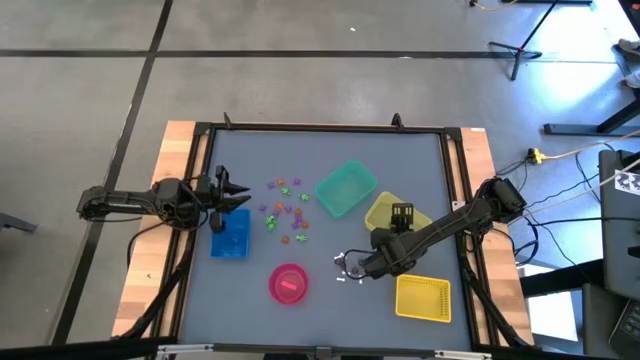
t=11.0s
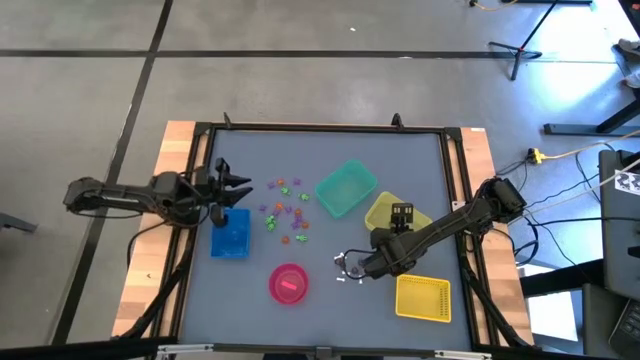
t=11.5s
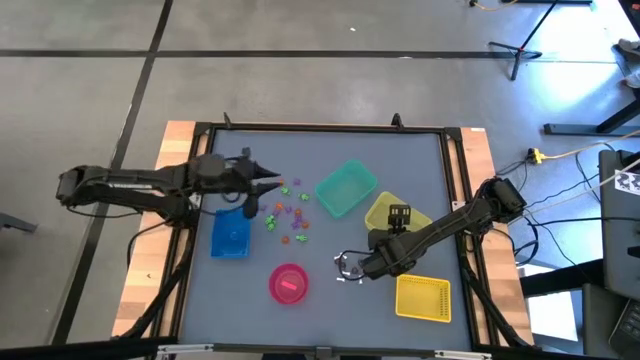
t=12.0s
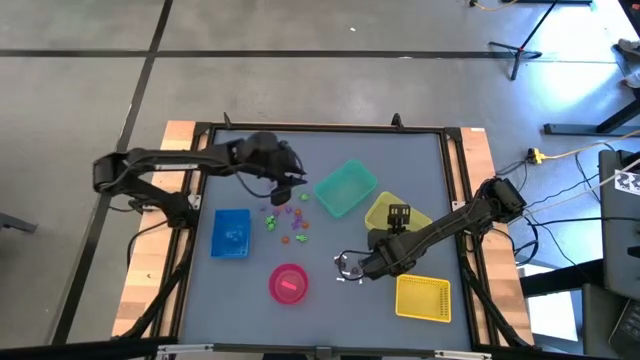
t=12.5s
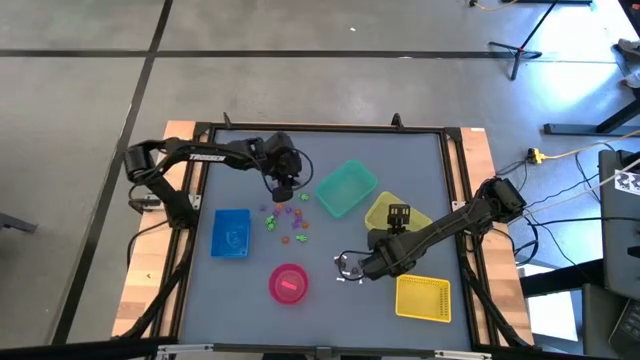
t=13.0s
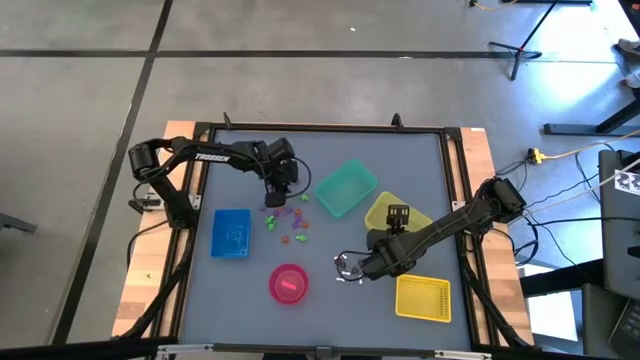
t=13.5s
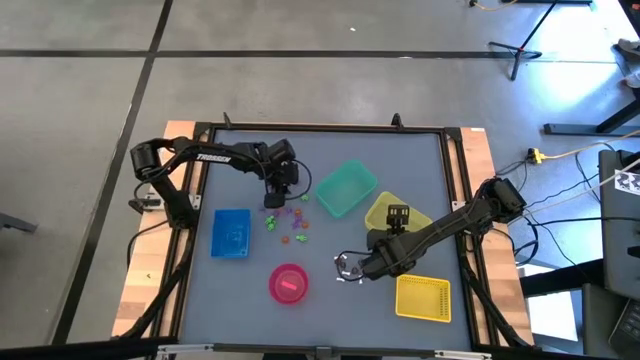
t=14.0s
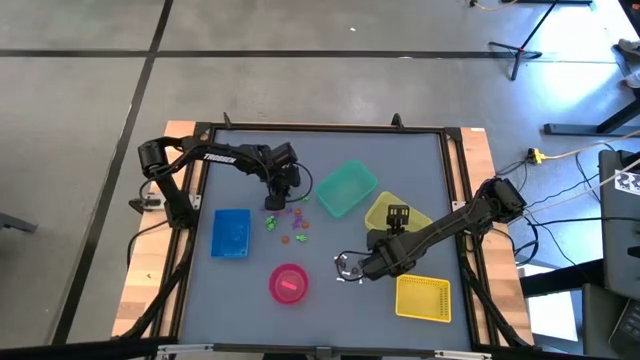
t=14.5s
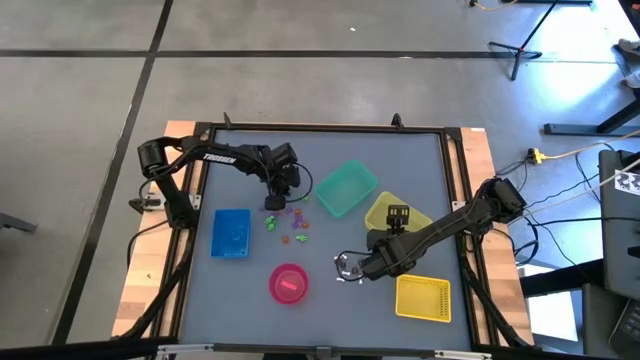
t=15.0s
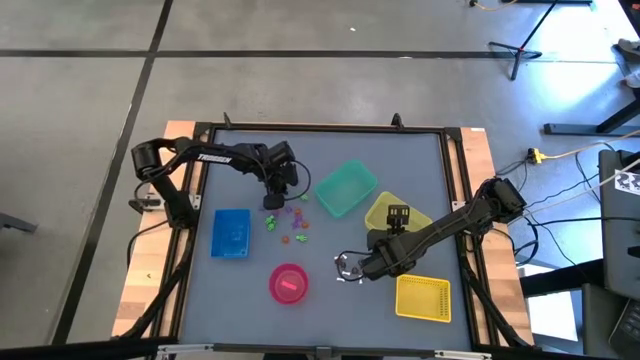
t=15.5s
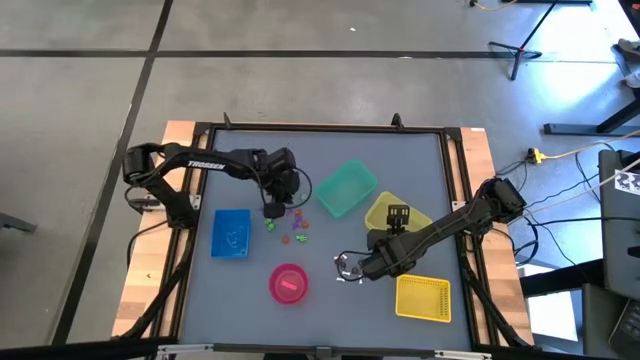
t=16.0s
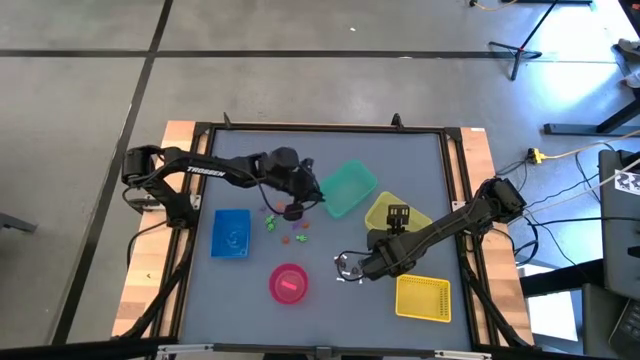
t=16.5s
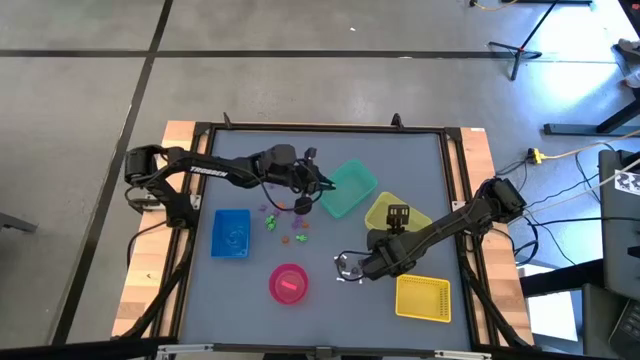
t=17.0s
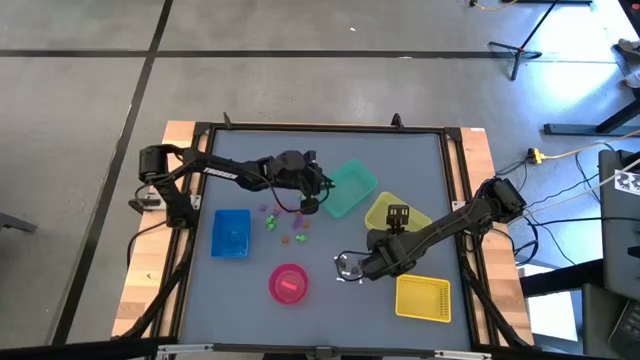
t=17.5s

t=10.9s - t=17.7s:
Task: Sort Halloween decoration
Put the green skeleton toy into the green bin

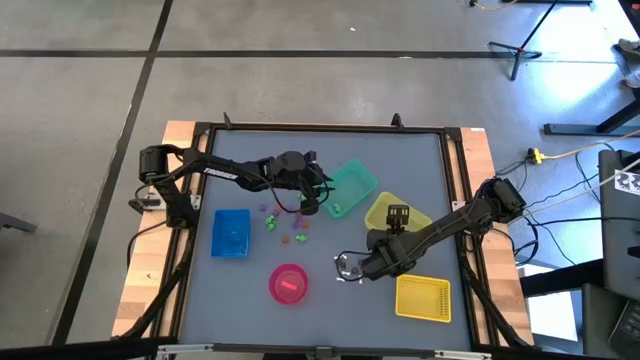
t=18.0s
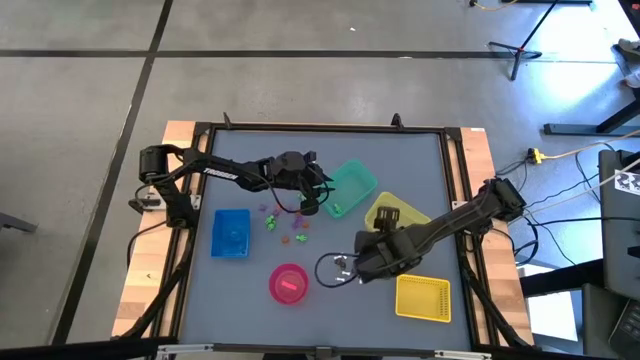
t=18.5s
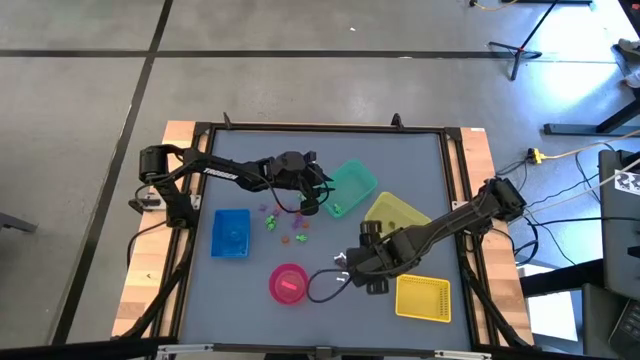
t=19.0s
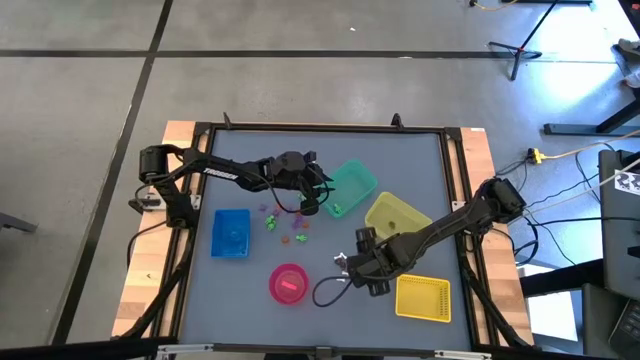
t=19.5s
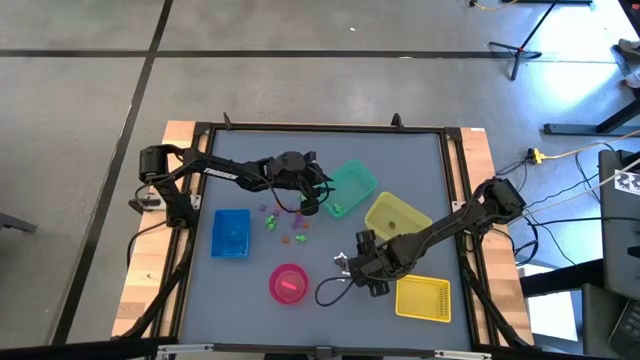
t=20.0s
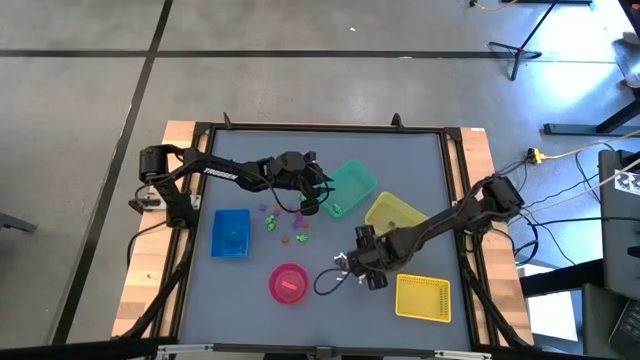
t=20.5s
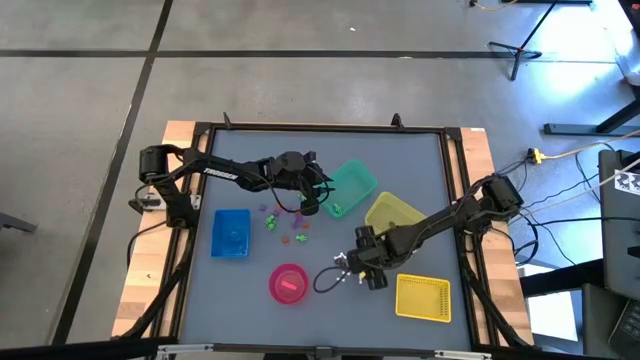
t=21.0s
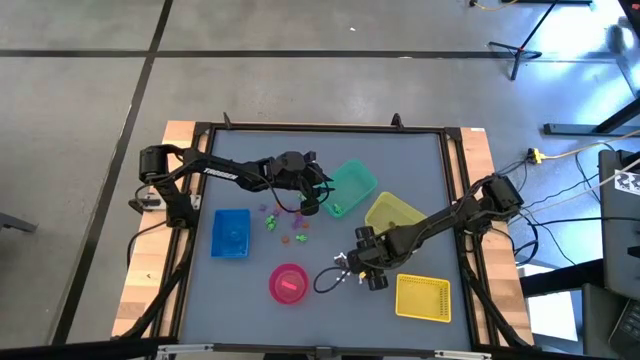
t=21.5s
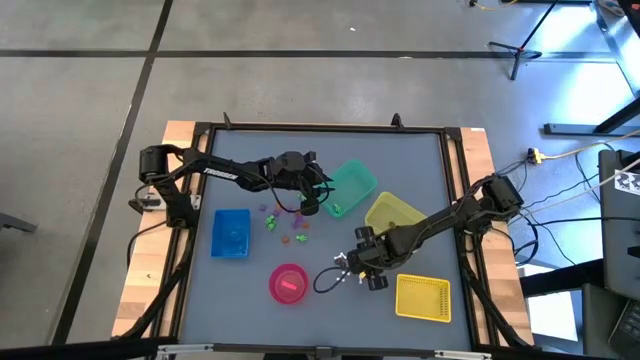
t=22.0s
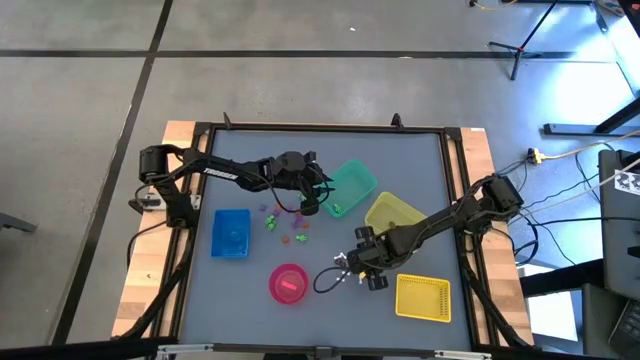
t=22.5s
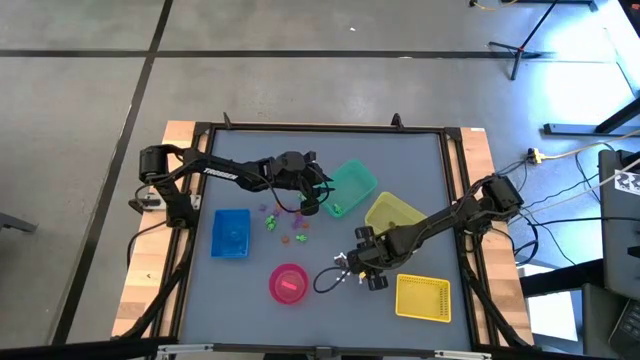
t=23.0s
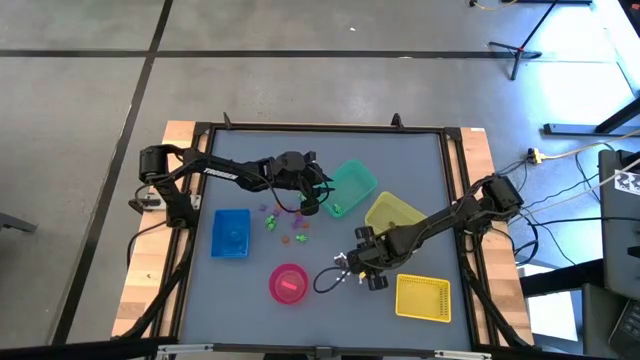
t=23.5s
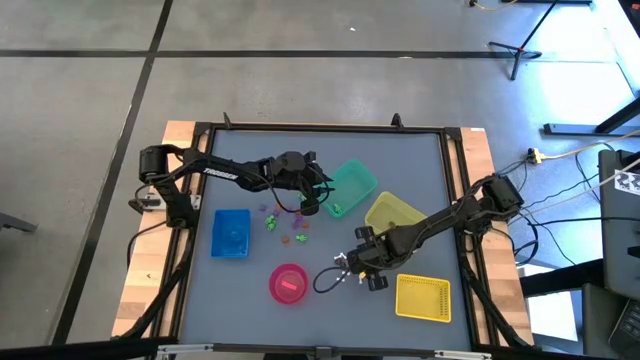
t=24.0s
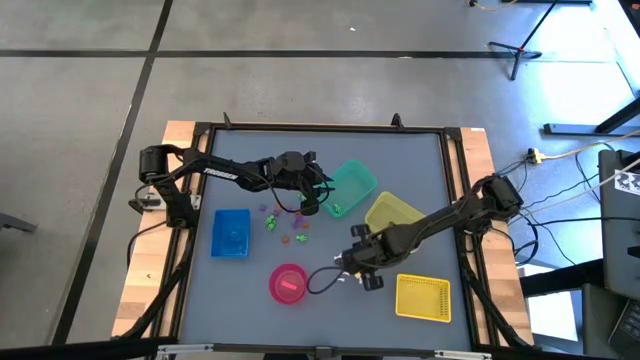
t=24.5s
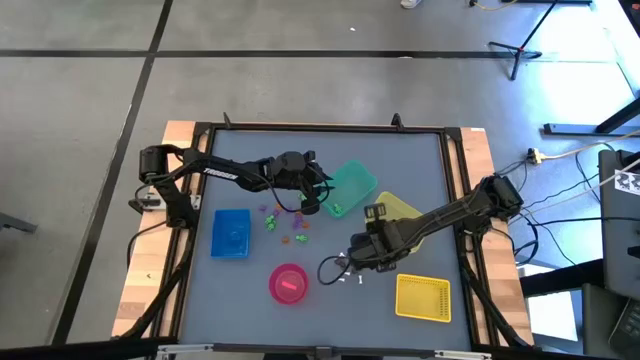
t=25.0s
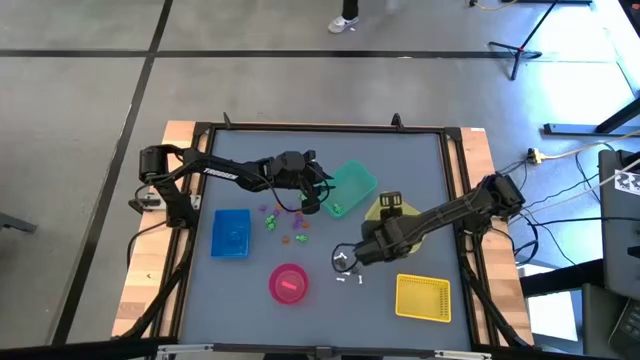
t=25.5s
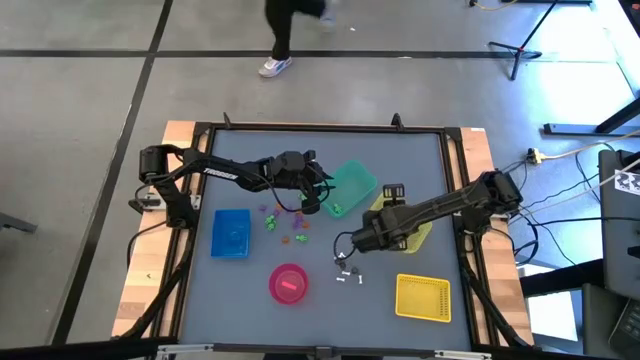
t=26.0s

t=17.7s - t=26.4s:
Put the black skull toy into the light yellow bin

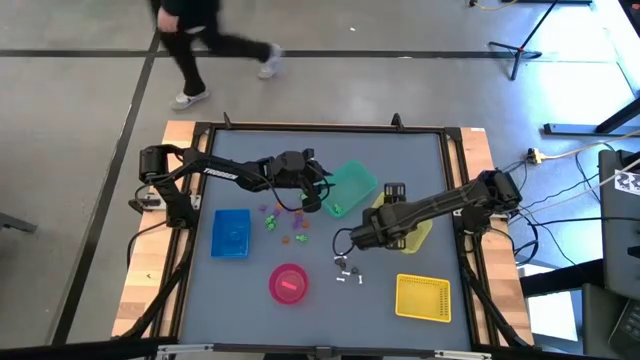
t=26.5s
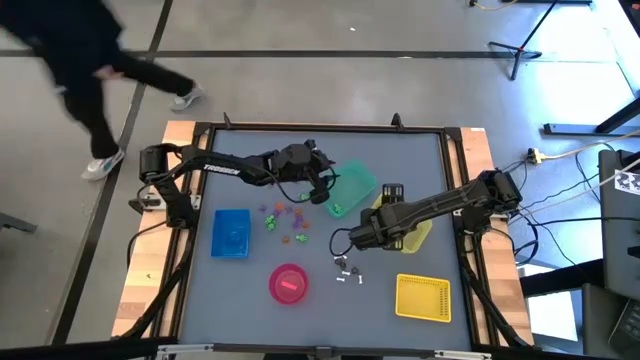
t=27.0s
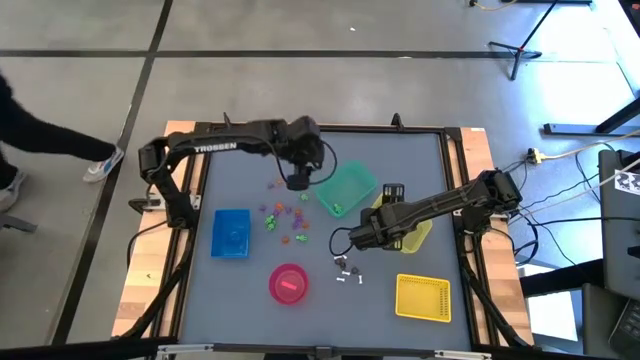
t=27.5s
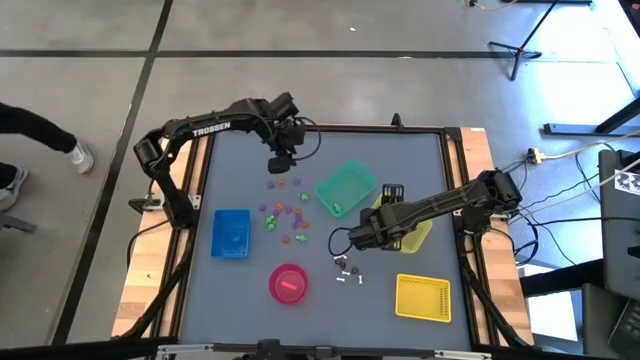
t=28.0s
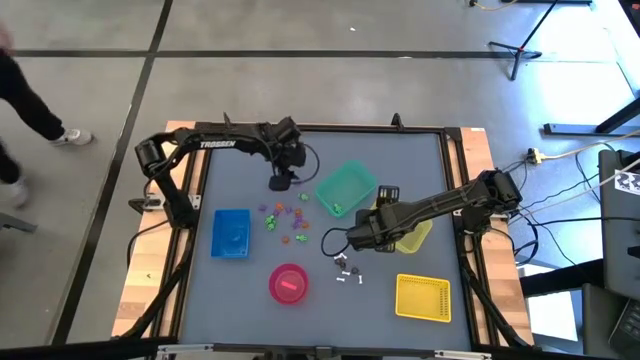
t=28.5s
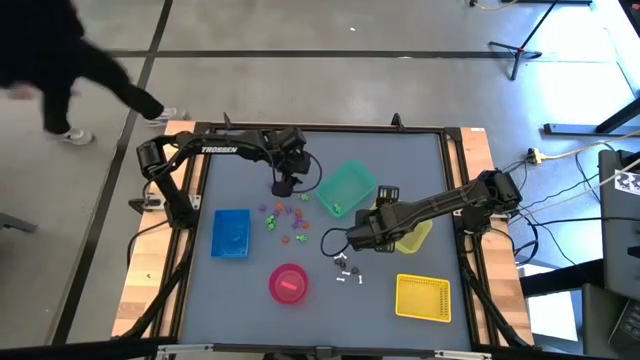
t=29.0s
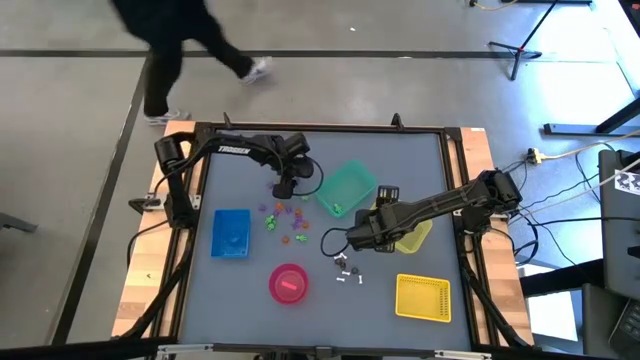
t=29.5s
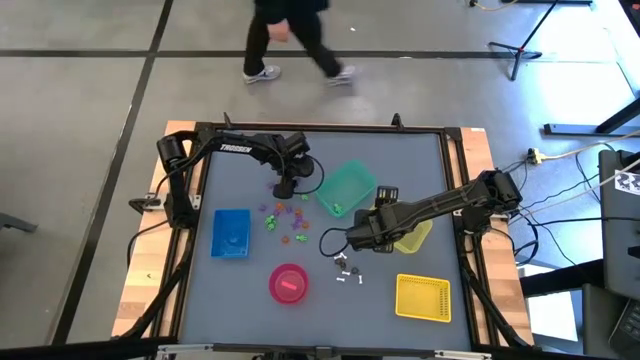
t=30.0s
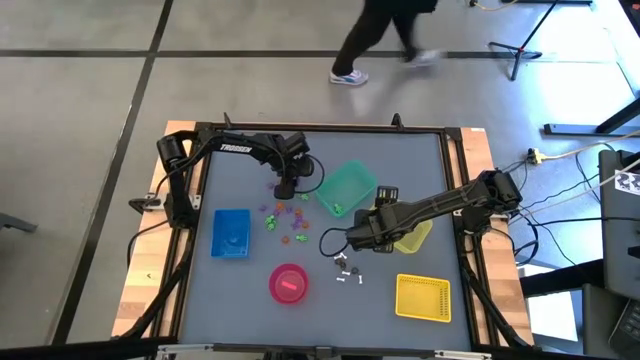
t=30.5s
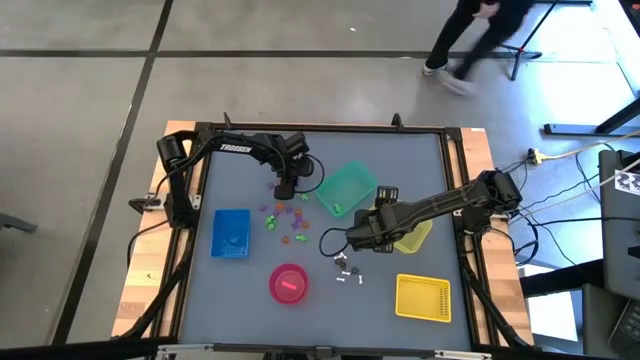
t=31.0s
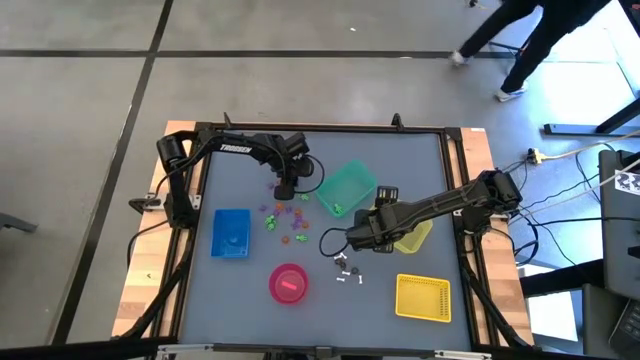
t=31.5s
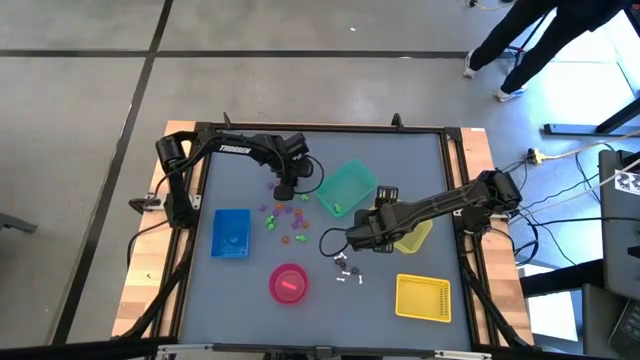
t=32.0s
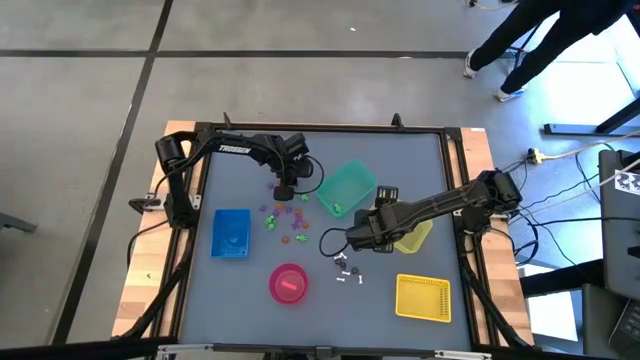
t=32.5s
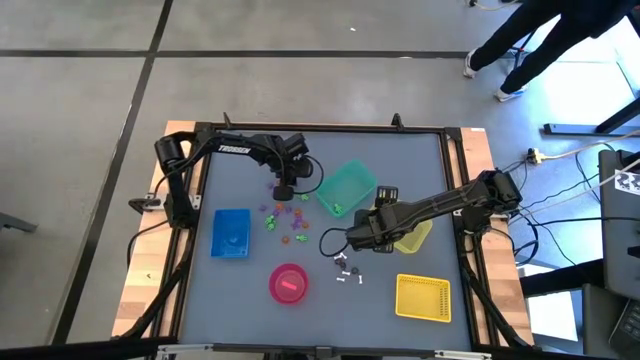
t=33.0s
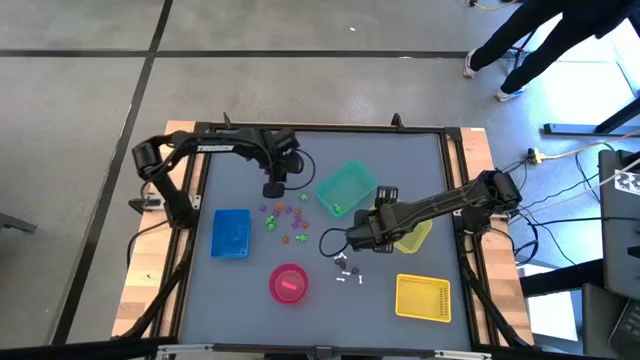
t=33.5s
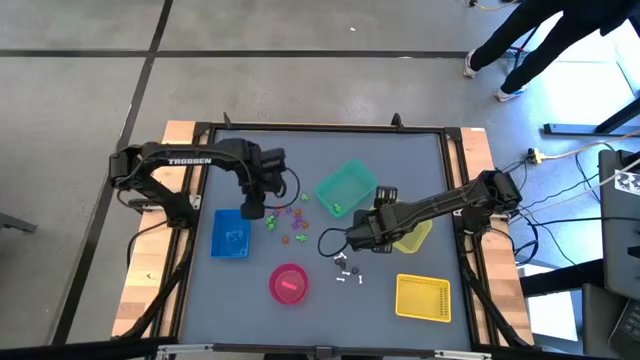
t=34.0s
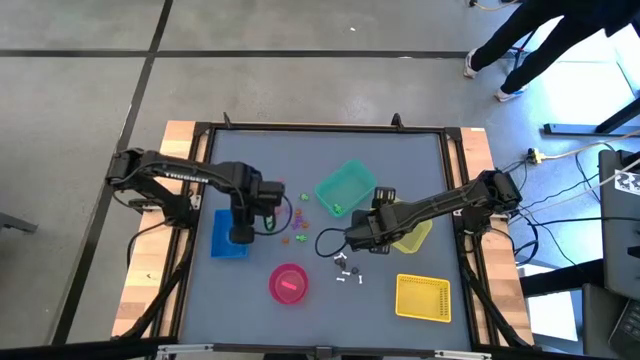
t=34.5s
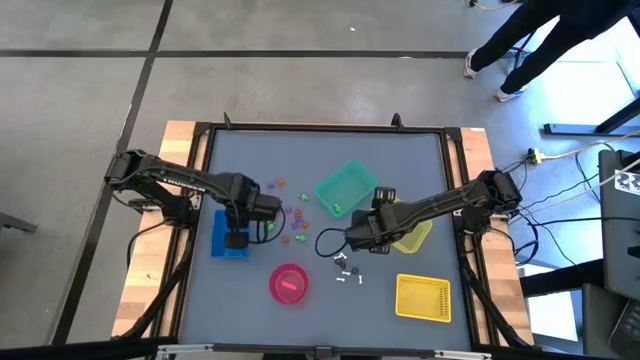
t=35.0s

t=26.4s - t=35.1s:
Put the violet spider toy into the blue bin
